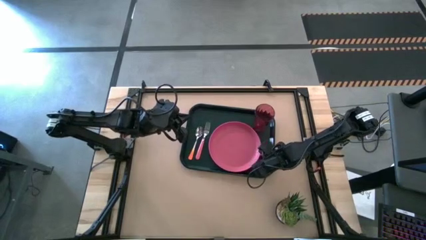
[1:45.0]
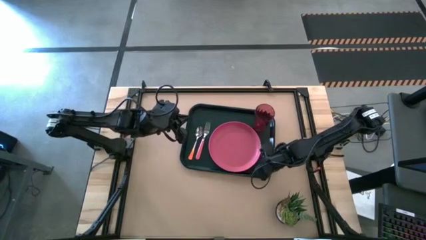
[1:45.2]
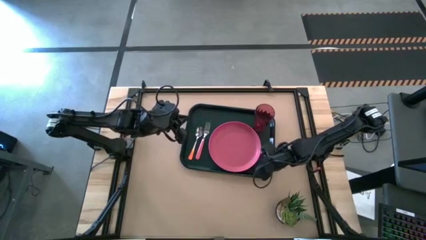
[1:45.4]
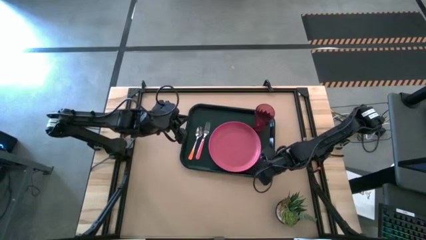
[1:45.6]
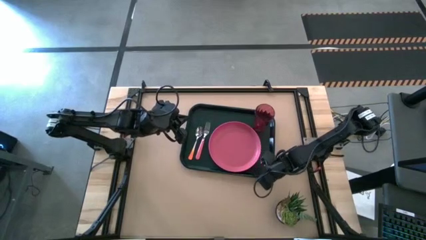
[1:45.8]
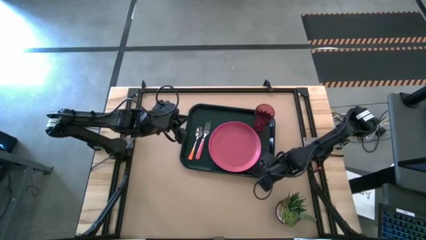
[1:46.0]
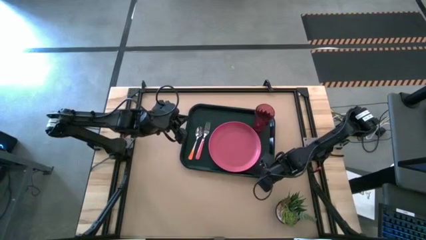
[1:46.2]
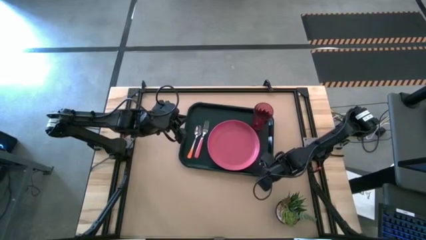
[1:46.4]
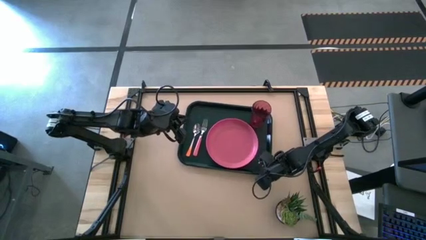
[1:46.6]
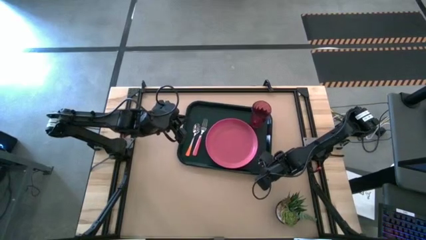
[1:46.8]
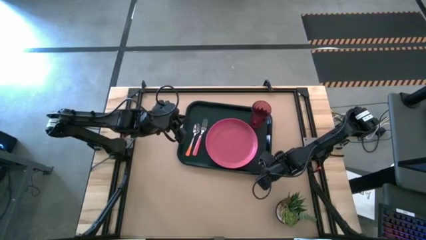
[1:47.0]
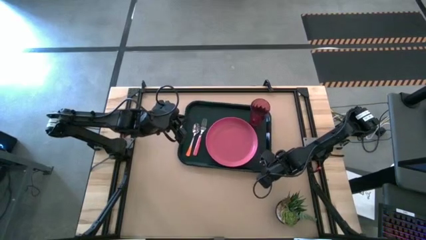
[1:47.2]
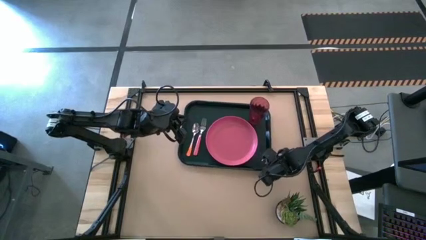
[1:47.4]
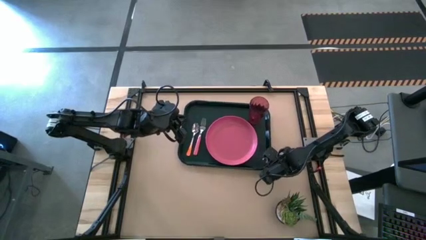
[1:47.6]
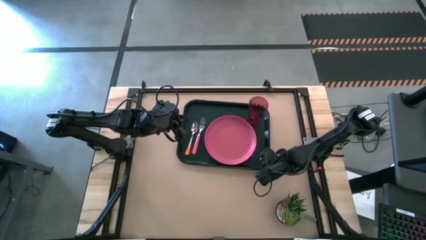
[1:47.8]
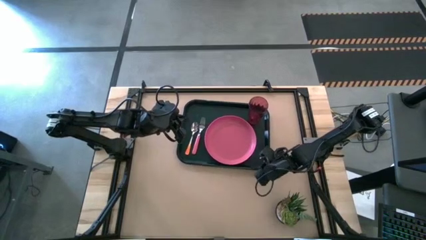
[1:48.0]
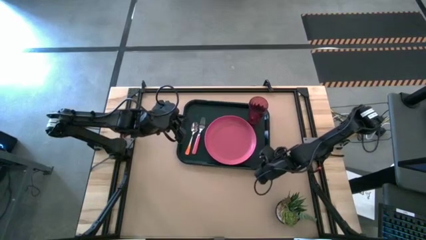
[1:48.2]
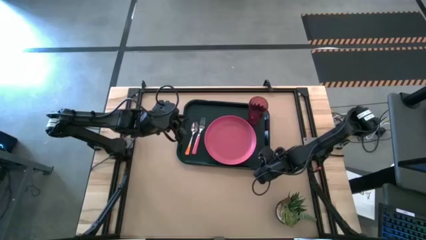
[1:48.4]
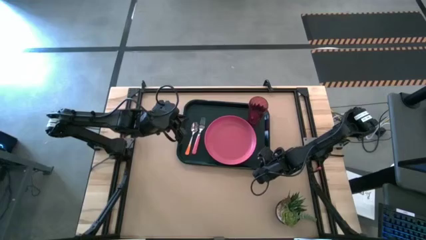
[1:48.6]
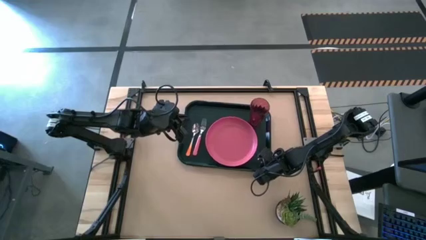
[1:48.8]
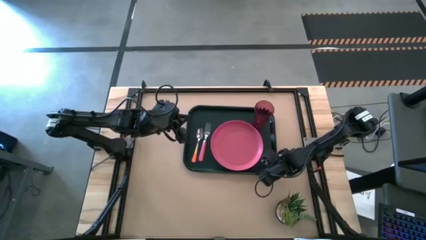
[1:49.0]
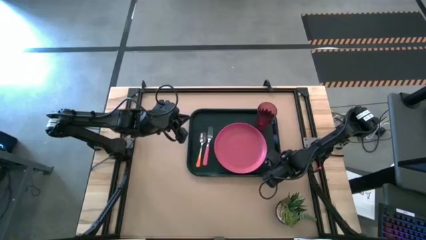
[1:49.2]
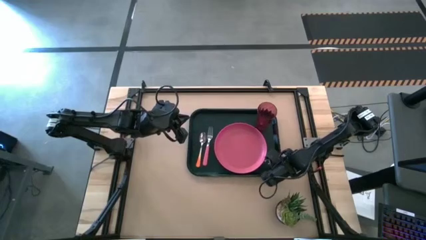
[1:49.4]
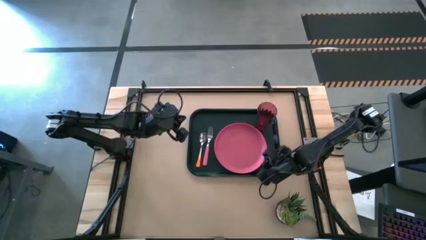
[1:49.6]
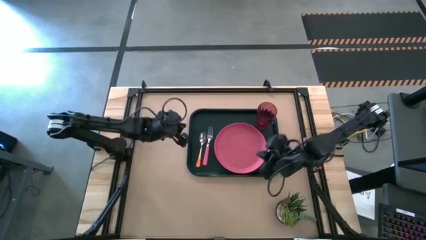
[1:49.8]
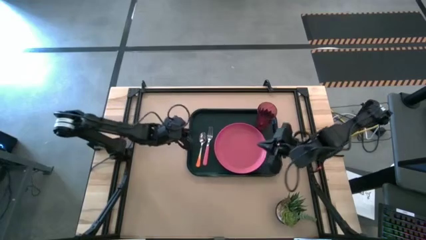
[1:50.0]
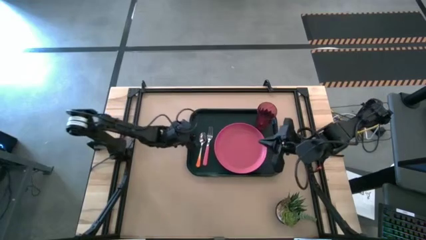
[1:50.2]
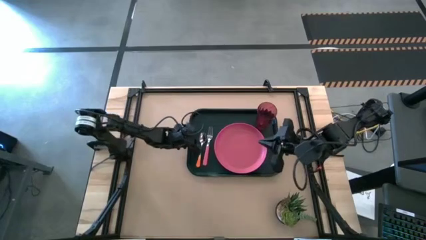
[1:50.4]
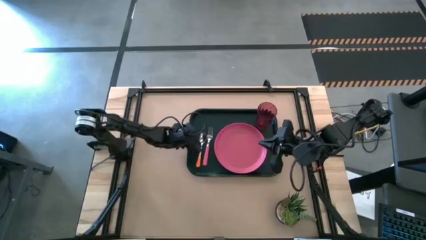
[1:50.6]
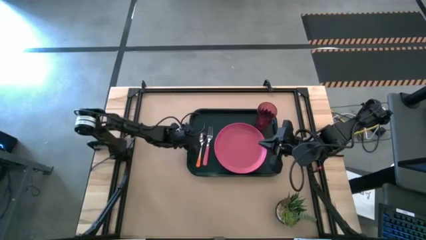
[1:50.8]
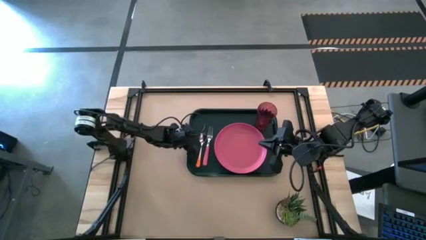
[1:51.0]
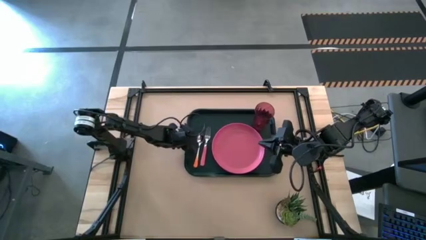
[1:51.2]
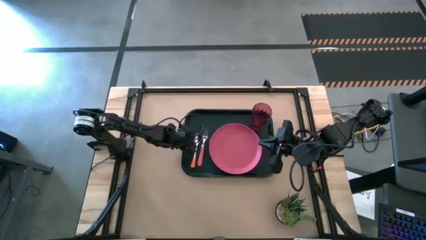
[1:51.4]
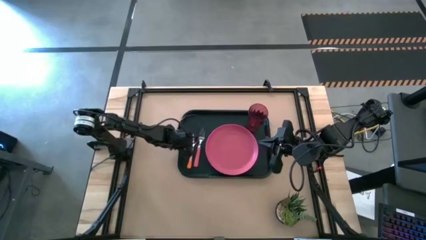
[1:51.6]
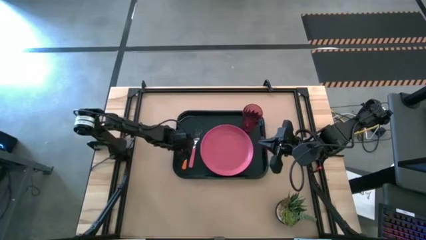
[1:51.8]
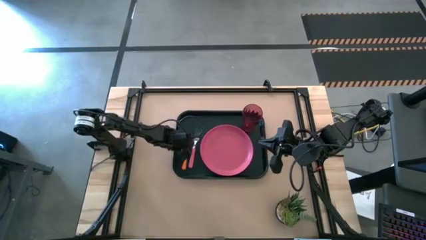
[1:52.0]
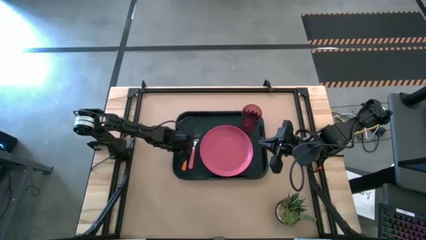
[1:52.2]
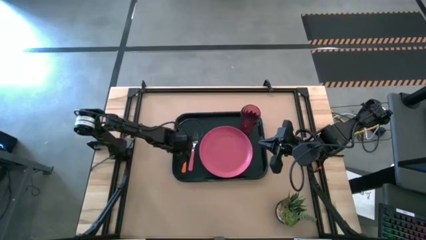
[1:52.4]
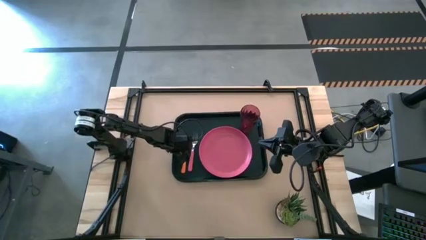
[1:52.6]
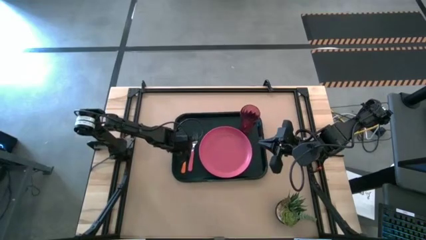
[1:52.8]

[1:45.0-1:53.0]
Task: Pick and place plate/cup/fork/spoon on tray
Adjust the black serving tray on the table

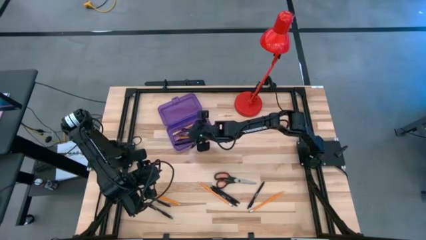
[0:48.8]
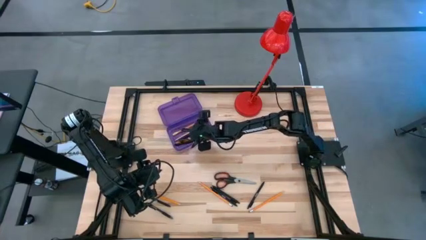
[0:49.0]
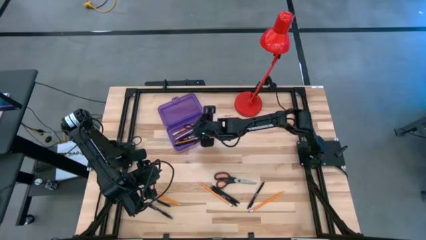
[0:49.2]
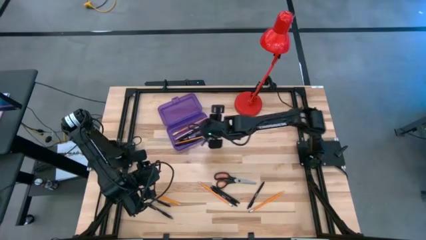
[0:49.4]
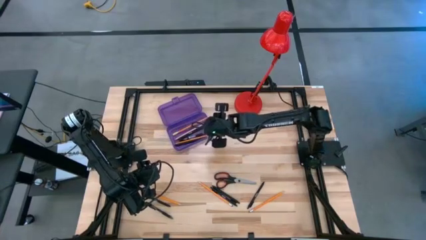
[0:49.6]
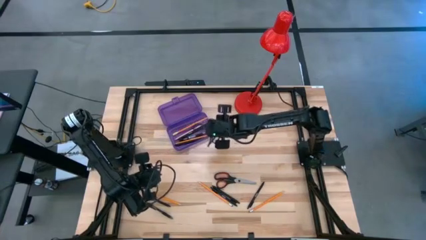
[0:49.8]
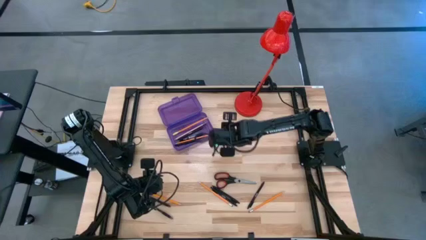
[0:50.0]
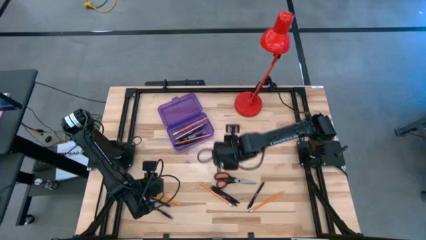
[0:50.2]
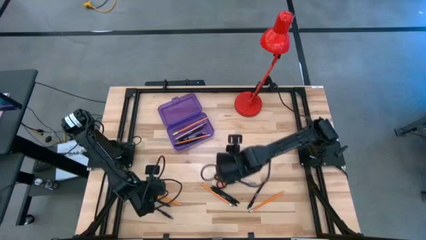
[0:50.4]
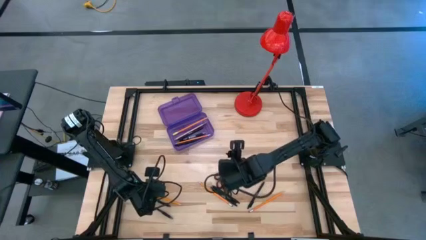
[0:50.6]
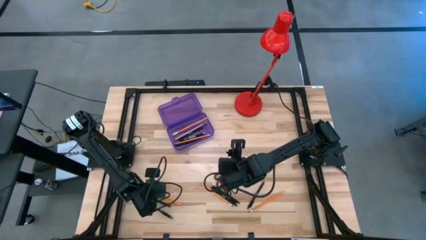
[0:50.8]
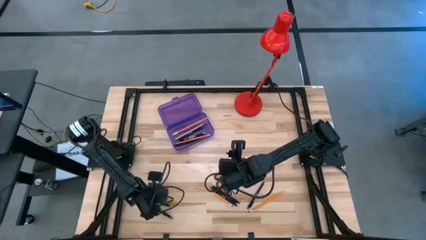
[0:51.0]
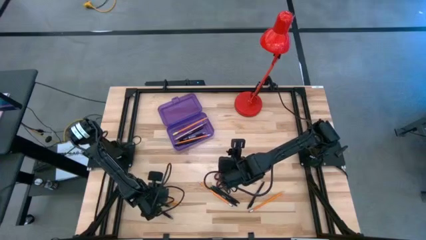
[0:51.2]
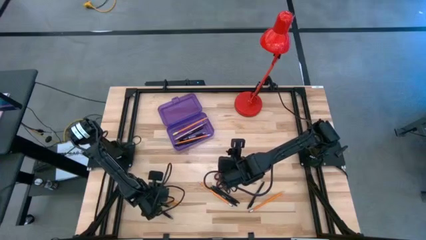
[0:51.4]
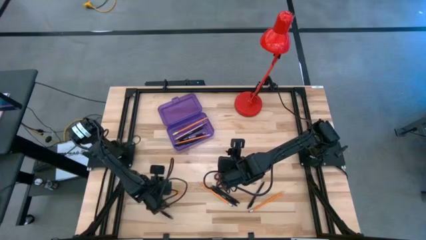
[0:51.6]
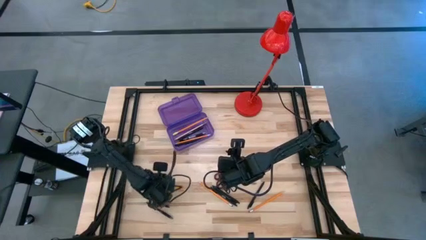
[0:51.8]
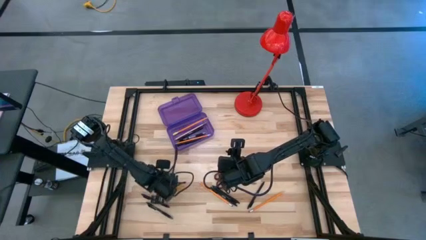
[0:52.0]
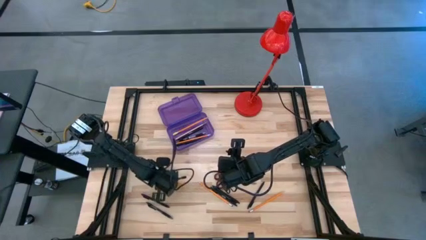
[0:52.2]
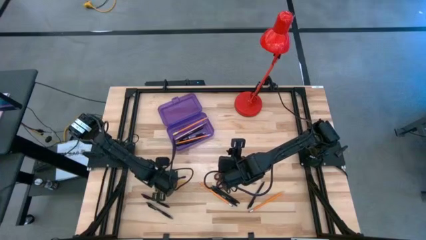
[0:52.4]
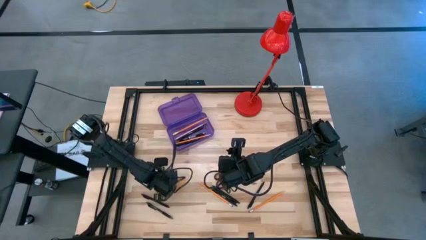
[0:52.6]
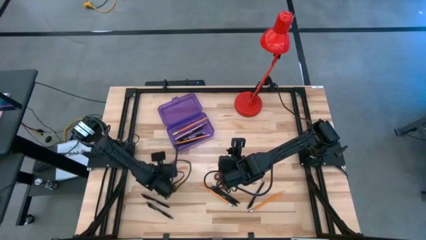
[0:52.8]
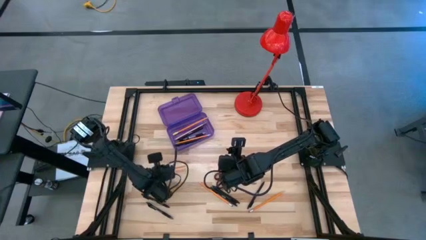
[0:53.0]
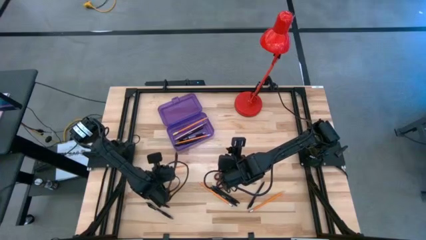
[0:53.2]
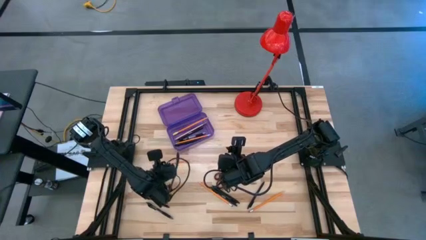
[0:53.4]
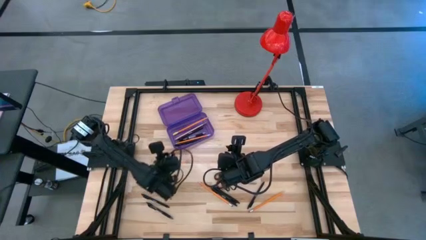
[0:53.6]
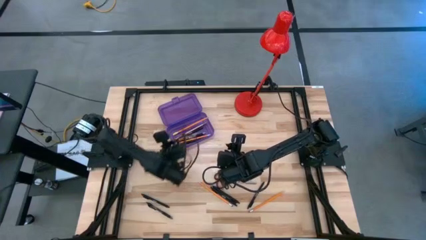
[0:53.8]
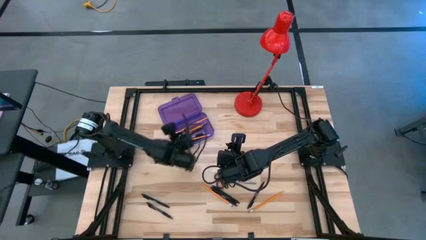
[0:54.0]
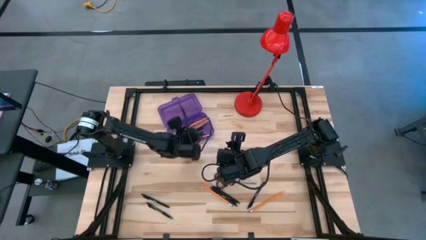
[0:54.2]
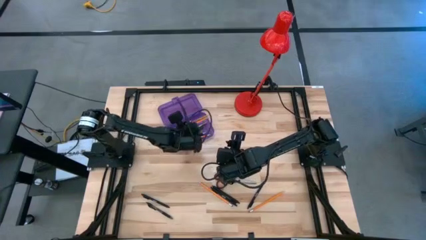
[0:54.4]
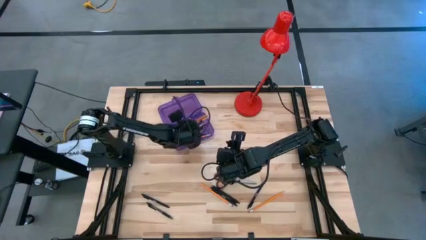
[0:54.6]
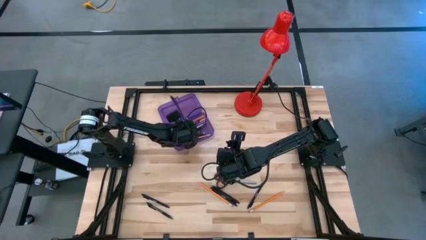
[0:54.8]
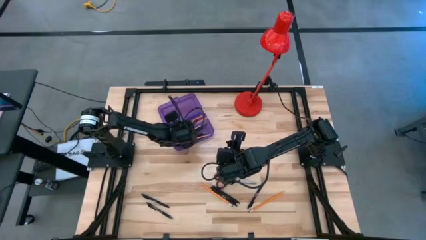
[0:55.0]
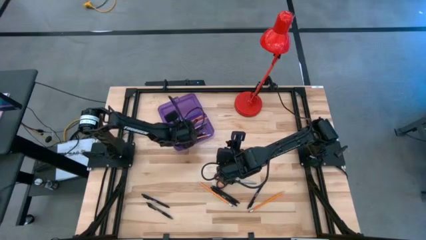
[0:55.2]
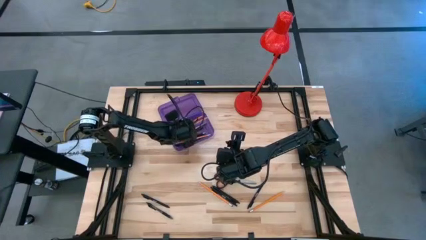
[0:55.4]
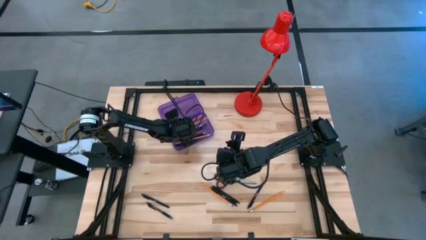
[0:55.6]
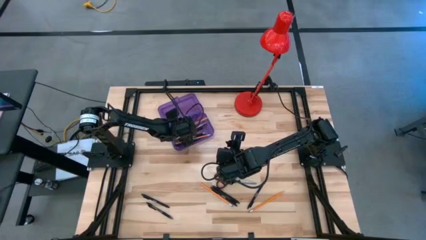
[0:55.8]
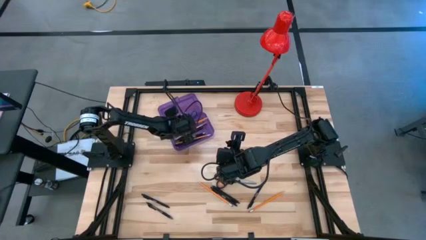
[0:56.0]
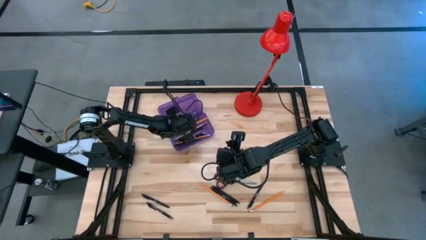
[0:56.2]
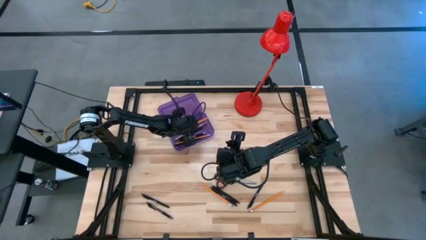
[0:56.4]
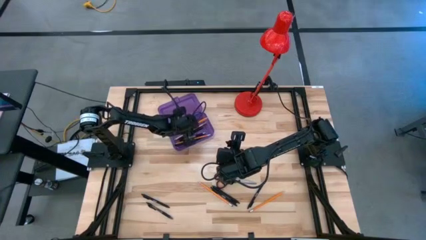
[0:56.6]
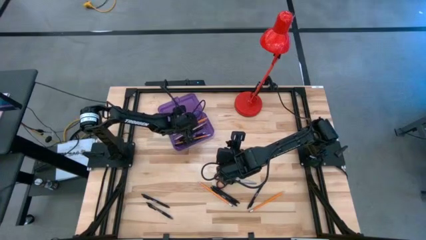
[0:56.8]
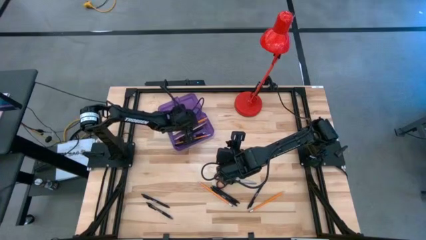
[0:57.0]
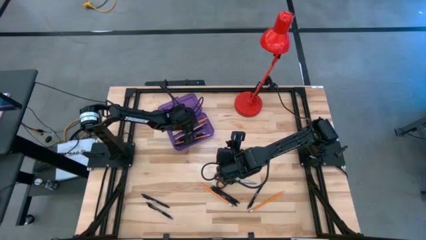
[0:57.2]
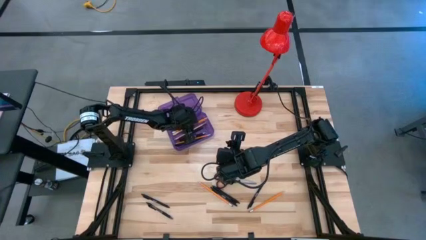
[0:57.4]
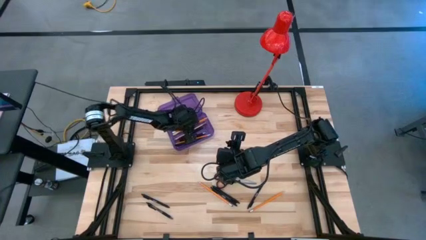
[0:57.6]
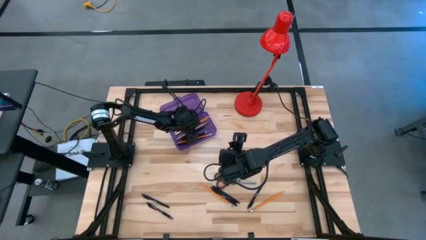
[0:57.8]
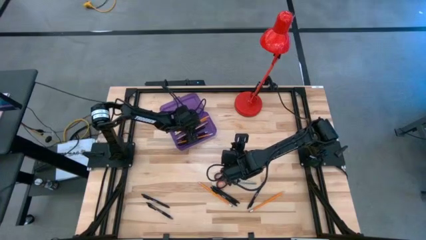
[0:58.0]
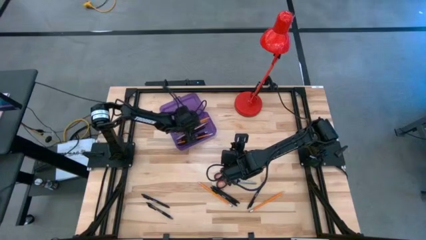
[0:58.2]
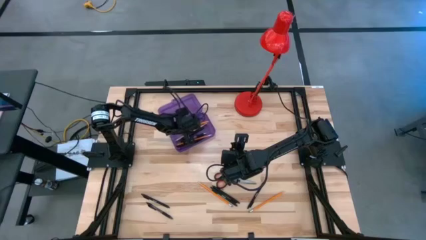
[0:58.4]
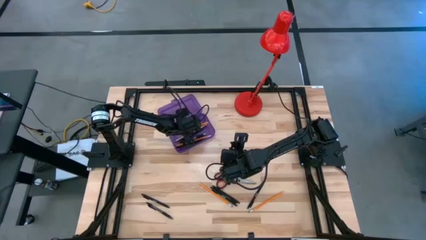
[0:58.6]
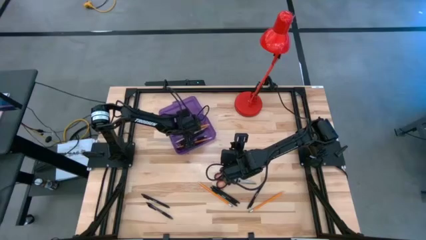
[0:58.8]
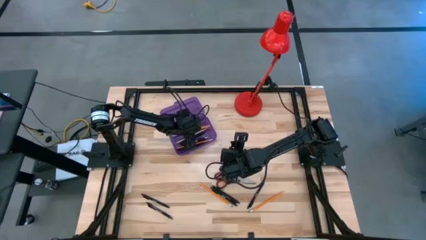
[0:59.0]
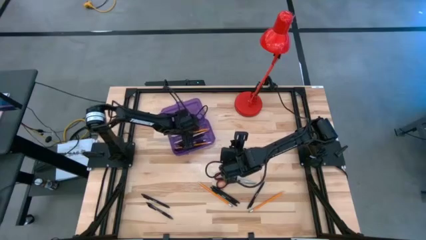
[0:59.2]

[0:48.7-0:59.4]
Task: Pick & place school supplies into a supply box
Put the yellow pencil into the purple supply box
